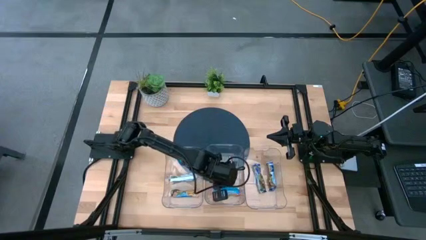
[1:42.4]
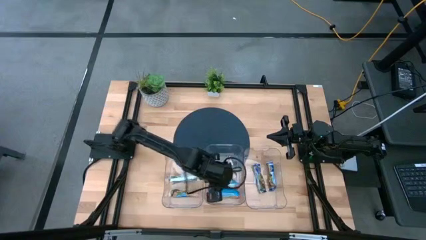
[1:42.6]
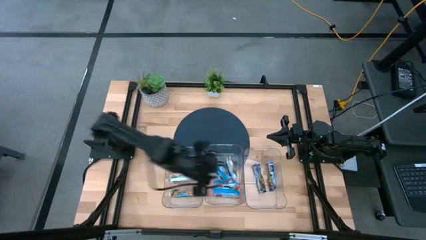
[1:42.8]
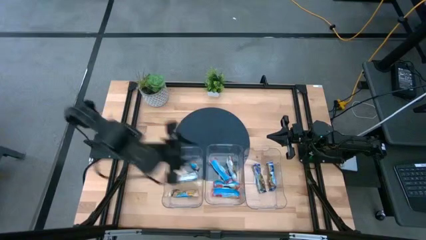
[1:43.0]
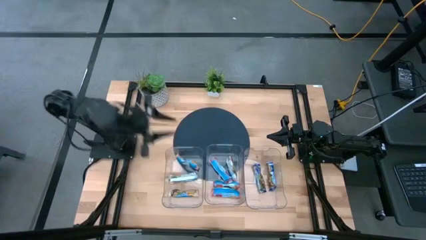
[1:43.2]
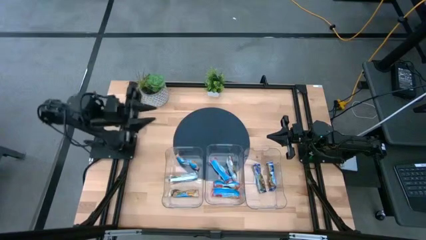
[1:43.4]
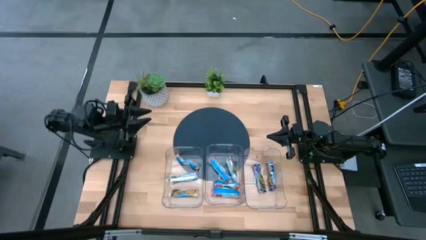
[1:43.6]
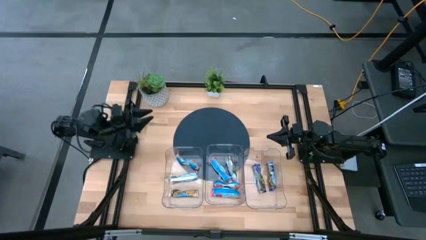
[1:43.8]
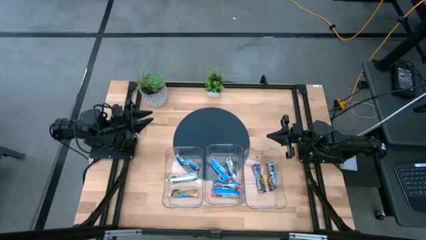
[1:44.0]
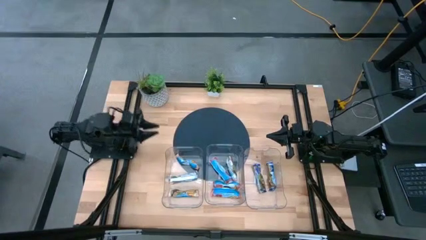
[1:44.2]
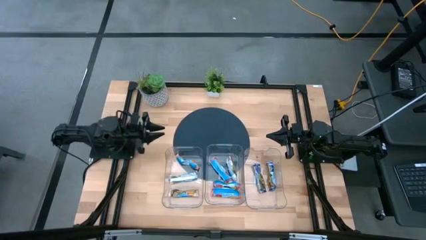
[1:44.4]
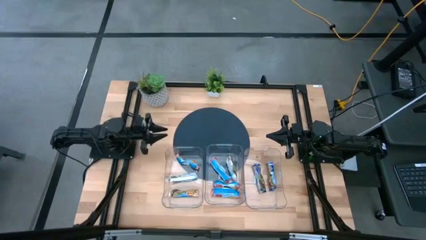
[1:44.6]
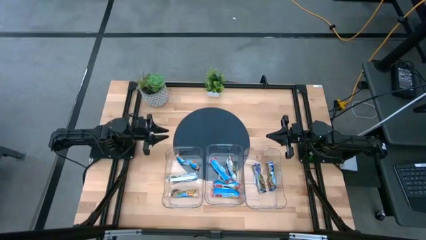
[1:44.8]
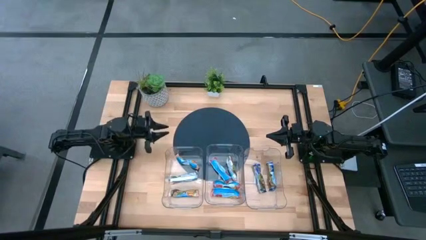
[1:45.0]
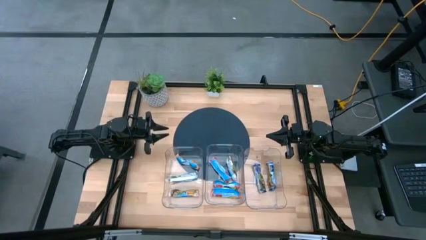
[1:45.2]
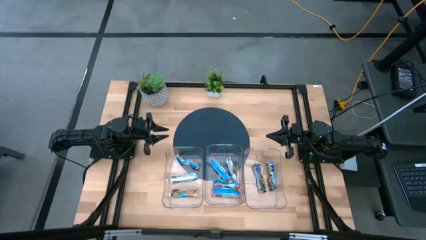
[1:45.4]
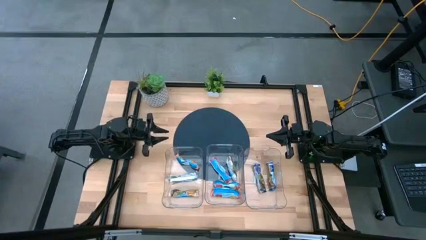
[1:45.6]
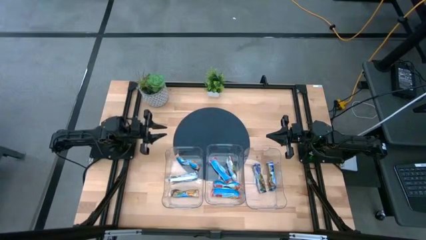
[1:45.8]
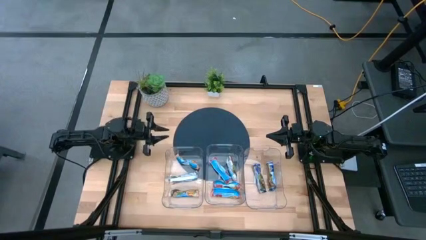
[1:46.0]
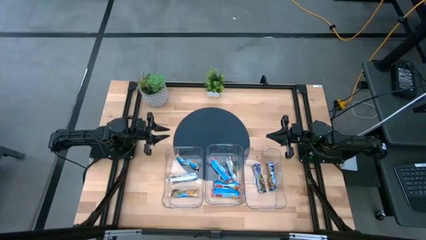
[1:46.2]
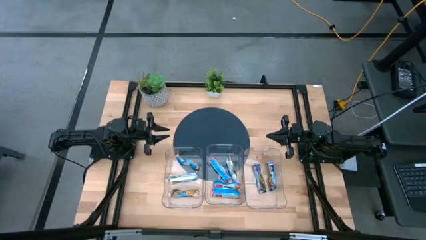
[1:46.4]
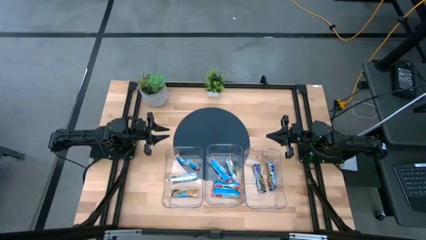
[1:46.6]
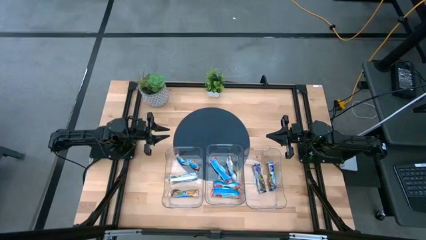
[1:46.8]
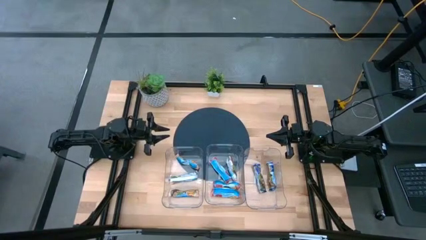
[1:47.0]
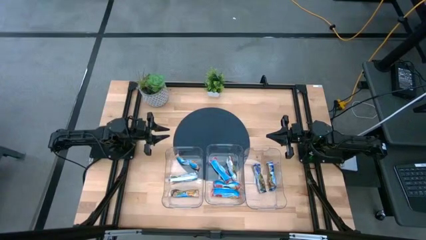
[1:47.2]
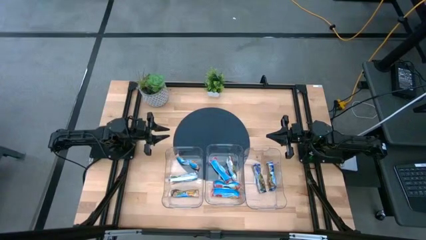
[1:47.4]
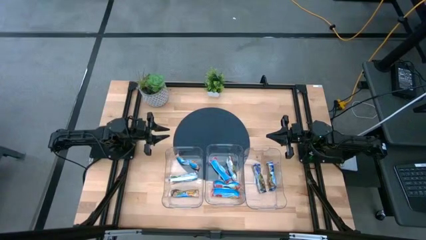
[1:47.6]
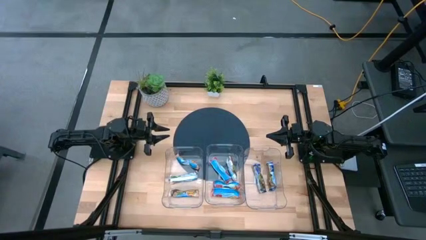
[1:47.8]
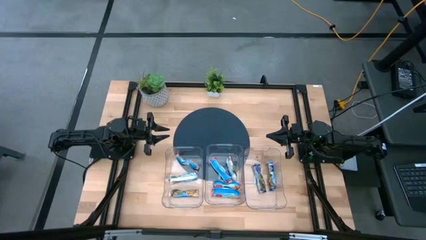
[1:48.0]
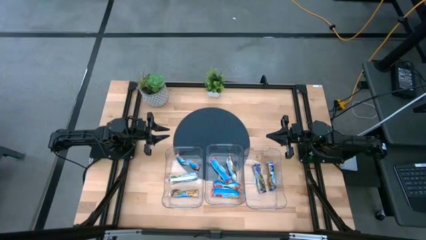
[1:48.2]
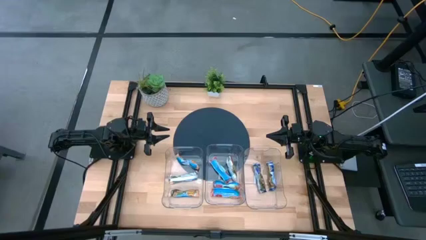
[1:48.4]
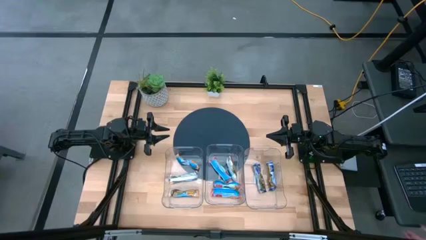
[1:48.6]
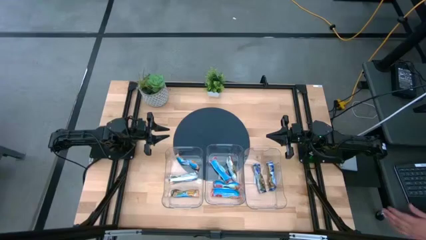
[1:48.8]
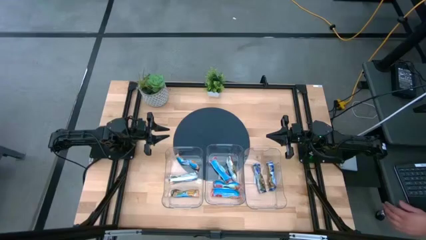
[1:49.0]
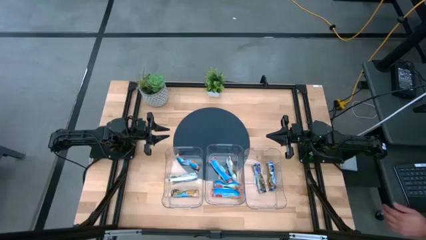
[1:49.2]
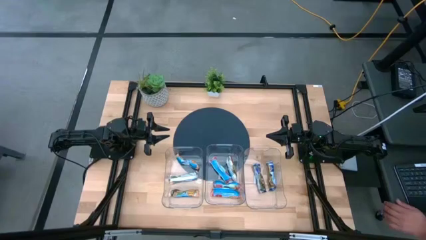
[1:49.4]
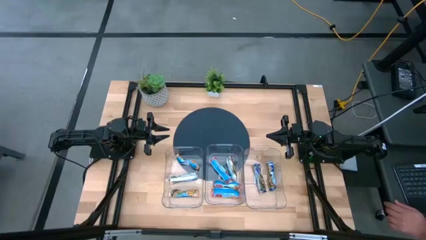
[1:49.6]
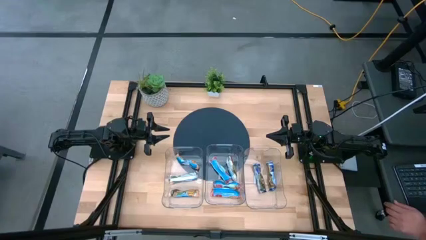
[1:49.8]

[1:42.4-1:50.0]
Task: Pick and place Granola Bars by type
Return to Home Position

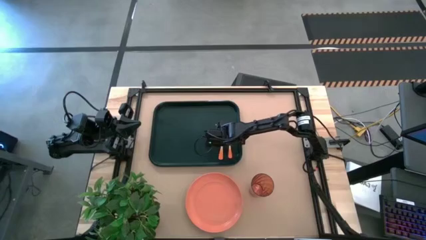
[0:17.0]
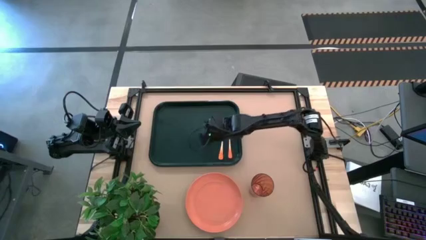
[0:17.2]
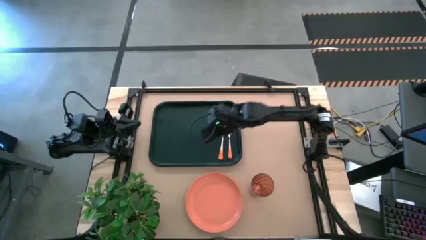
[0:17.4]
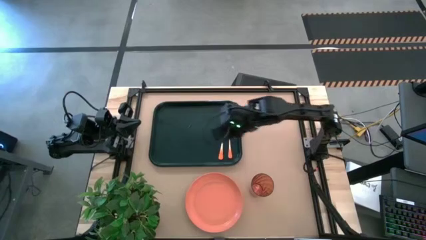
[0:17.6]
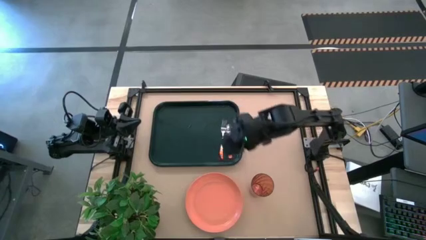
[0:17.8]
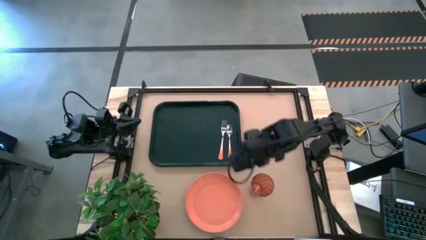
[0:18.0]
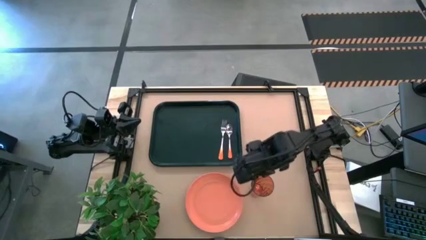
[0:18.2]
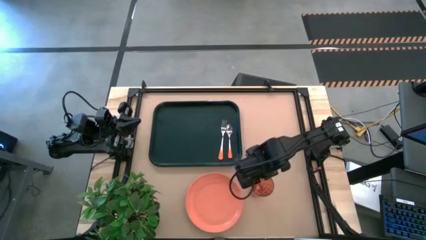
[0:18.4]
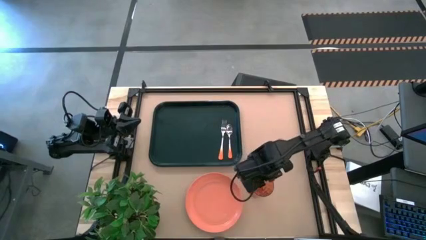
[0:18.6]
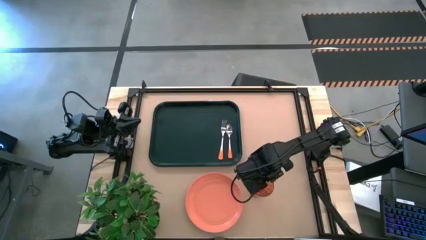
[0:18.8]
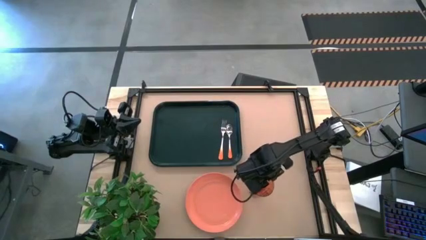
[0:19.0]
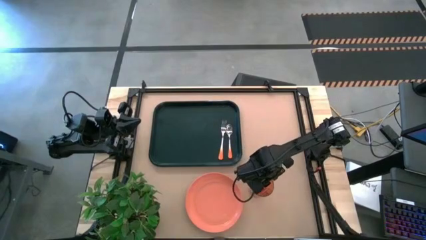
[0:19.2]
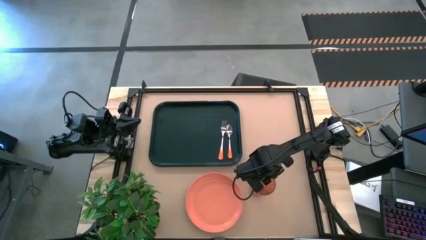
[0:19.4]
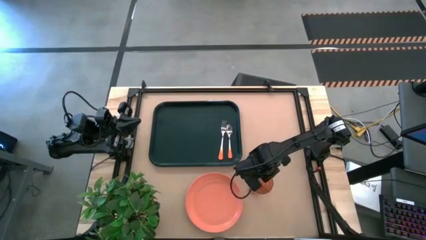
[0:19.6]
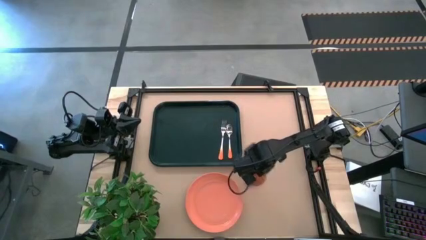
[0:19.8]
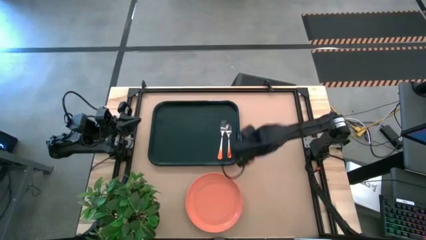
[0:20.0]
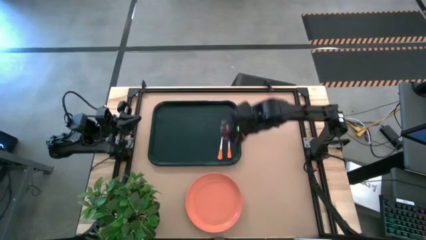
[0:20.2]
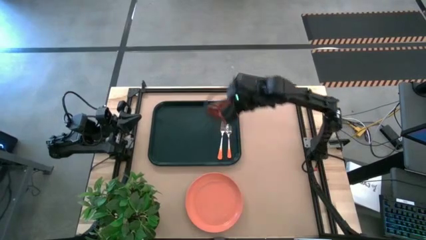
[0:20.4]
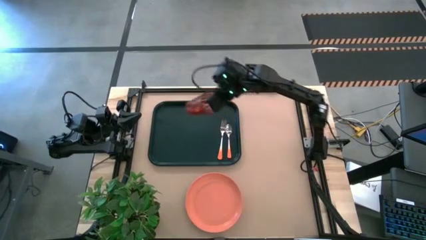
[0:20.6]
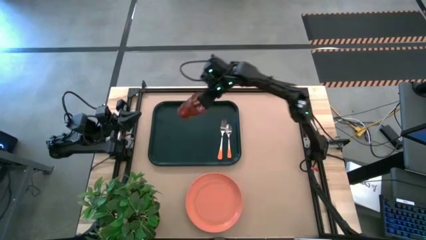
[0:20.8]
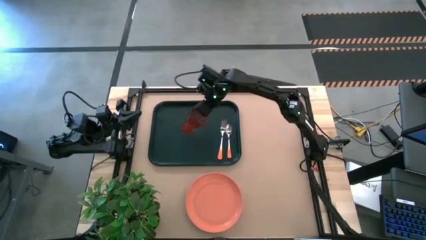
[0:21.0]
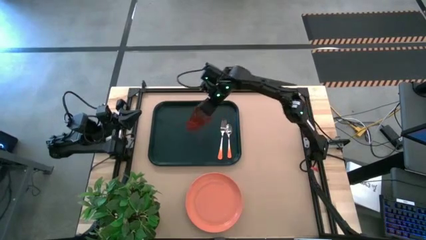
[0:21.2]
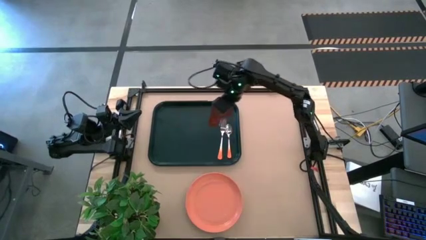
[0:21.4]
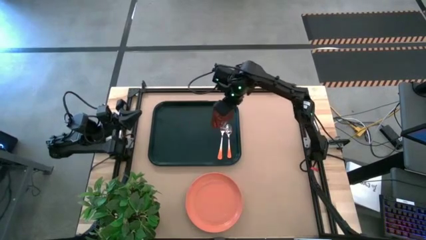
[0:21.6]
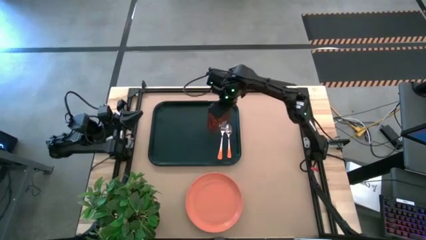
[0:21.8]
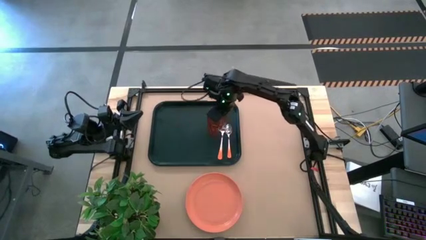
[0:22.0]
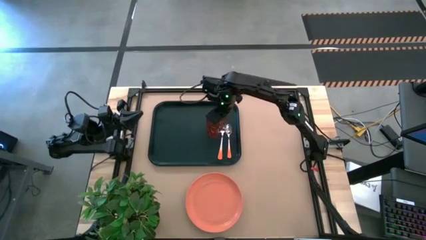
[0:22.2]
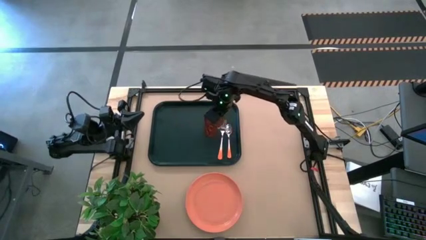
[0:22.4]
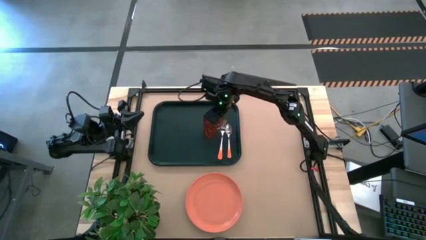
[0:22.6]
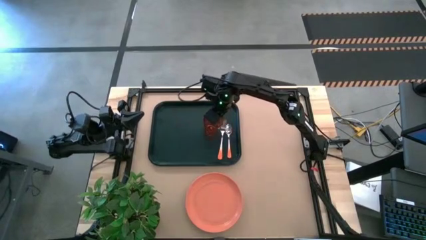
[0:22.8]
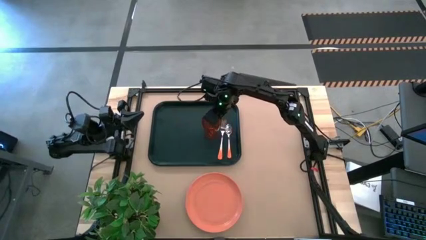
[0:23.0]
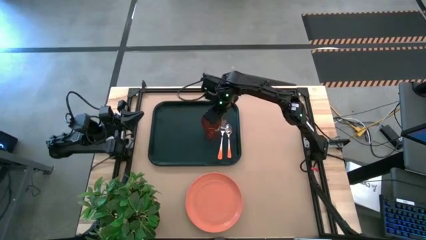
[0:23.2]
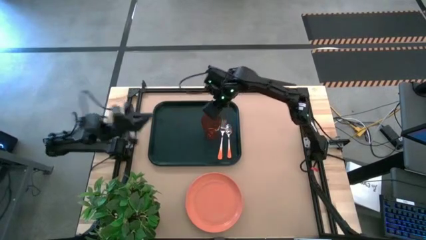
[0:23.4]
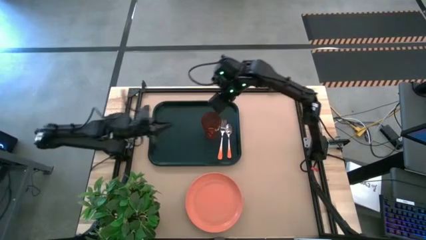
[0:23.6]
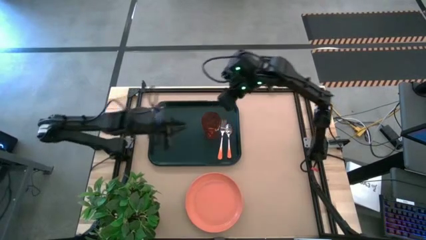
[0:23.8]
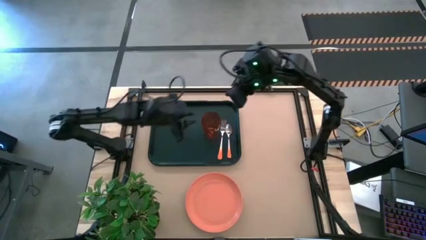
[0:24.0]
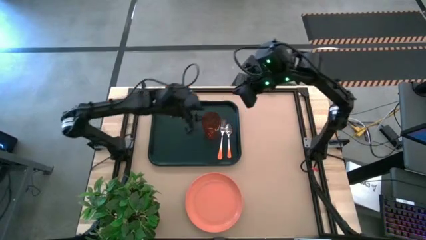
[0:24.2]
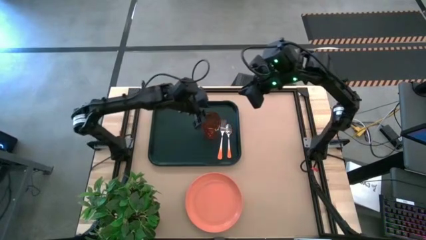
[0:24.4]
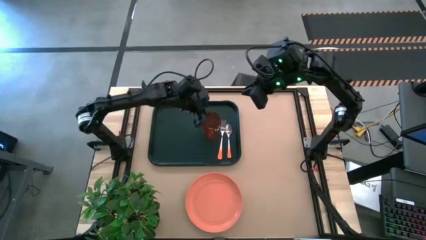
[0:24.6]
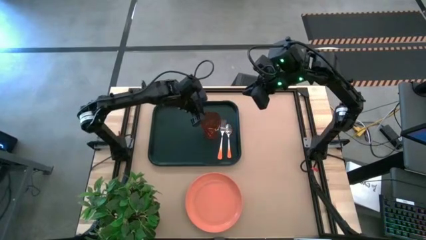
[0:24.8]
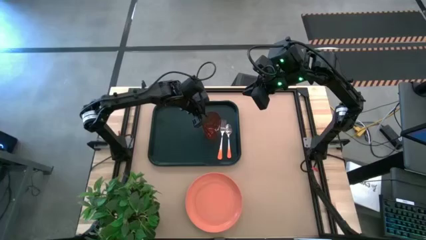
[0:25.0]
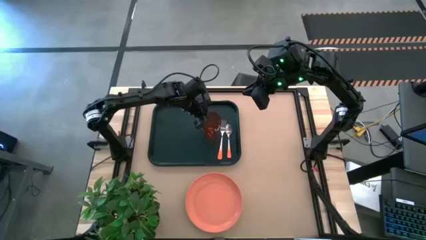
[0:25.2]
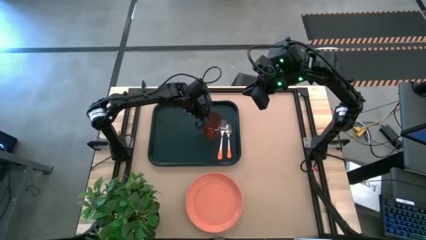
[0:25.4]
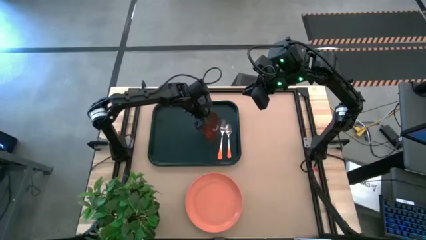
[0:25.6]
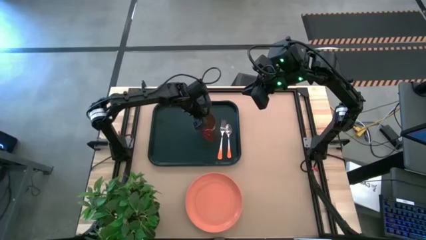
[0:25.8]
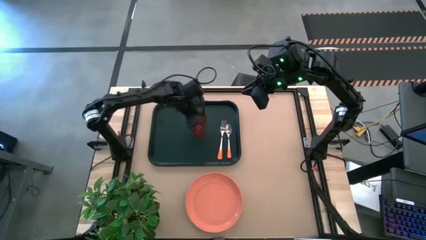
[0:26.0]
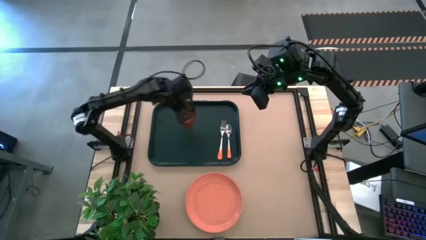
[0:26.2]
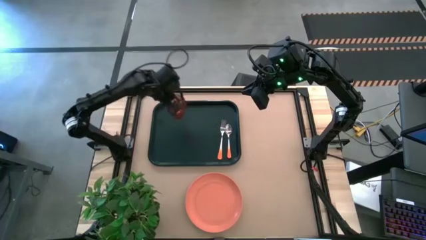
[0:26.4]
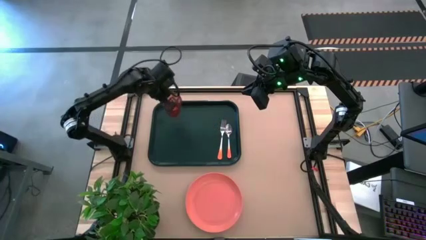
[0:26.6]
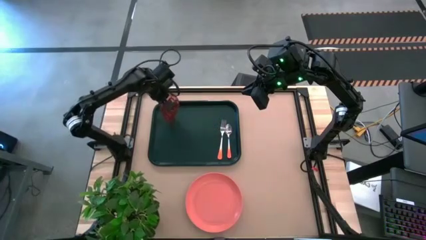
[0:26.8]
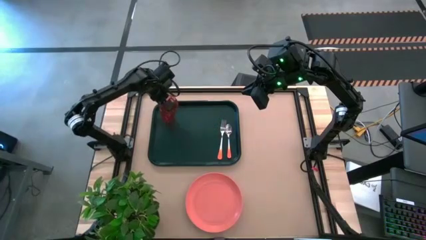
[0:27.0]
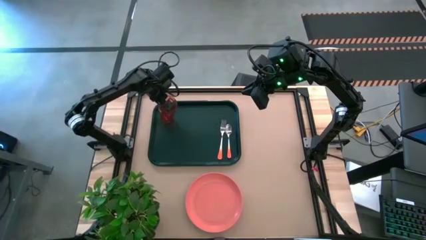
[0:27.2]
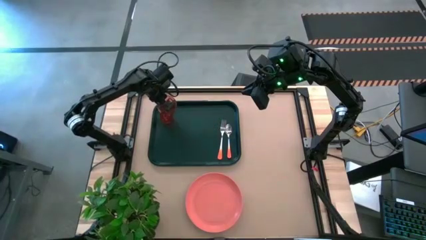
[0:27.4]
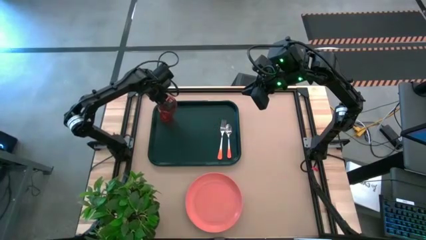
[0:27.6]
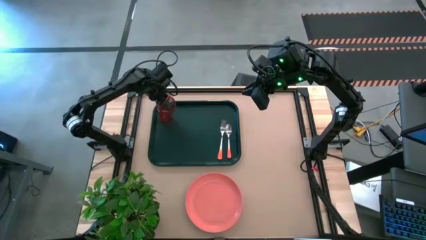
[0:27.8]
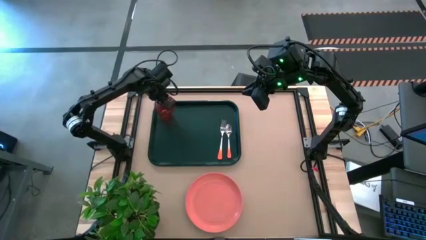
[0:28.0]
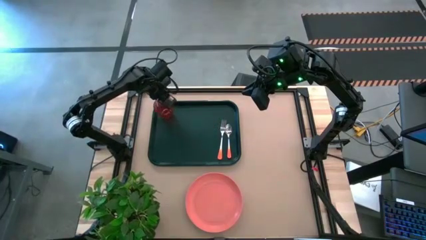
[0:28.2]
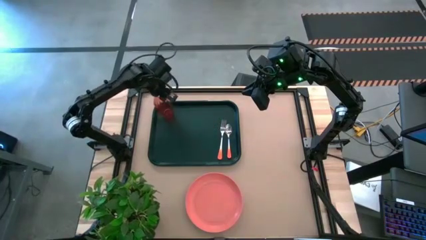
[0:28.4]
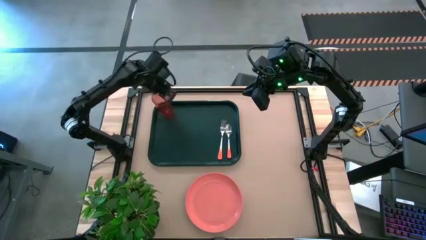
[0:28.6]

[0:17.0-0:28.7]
Task: Pick and place plate/cup/fork/spoon on tray
Put the orange glass on the black table tray
